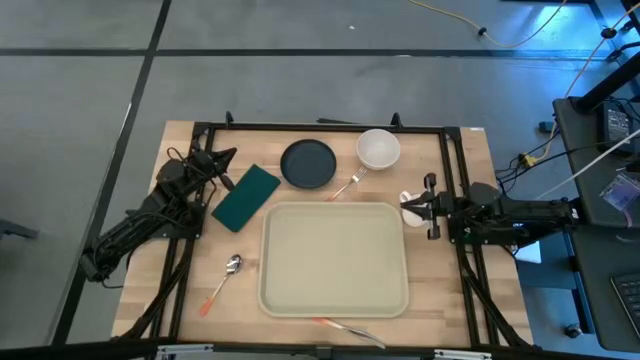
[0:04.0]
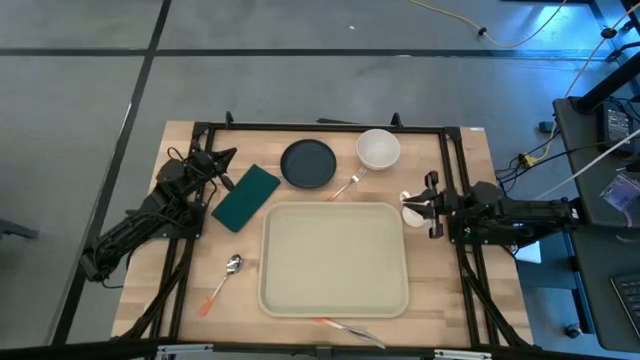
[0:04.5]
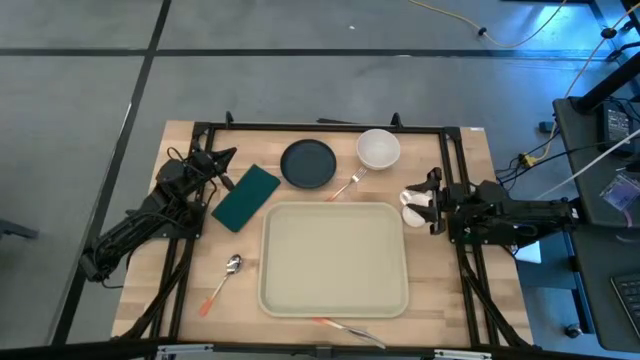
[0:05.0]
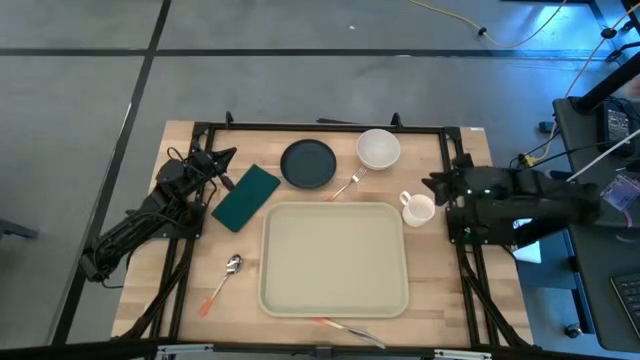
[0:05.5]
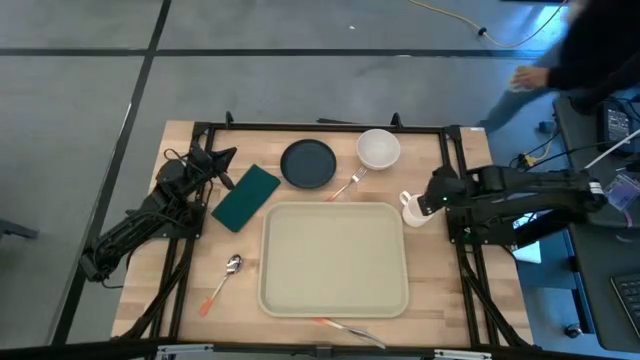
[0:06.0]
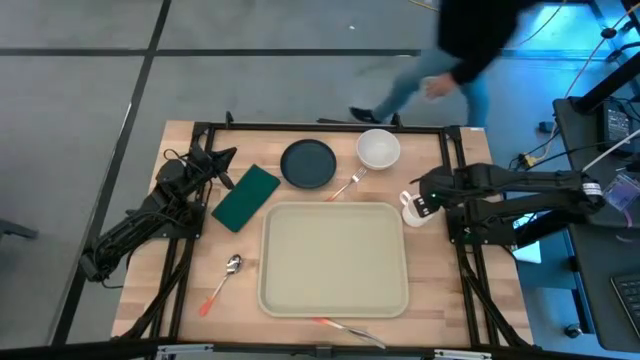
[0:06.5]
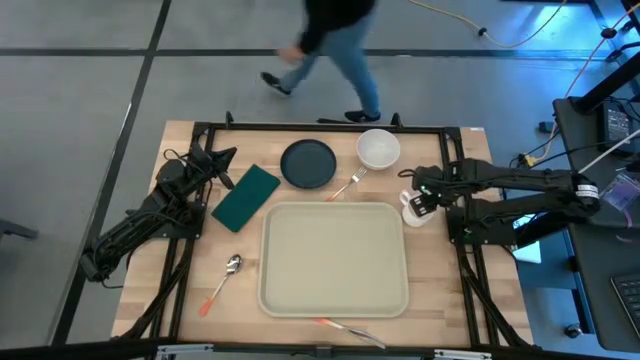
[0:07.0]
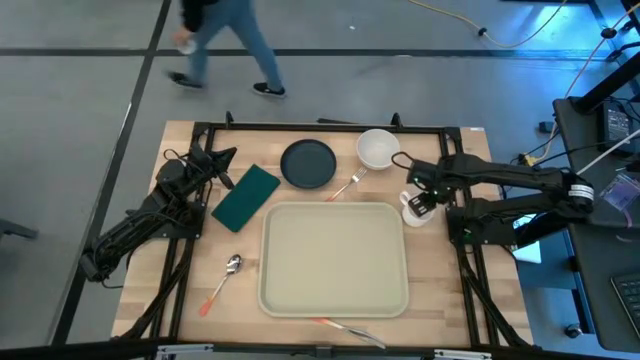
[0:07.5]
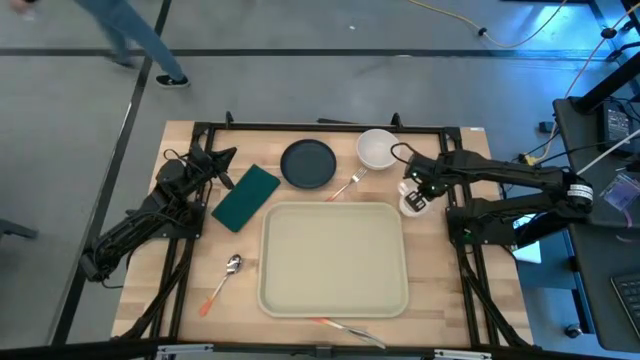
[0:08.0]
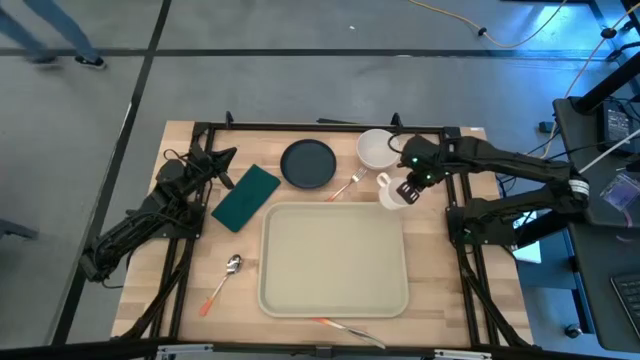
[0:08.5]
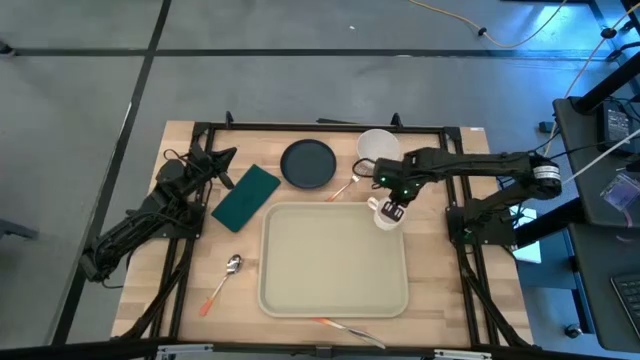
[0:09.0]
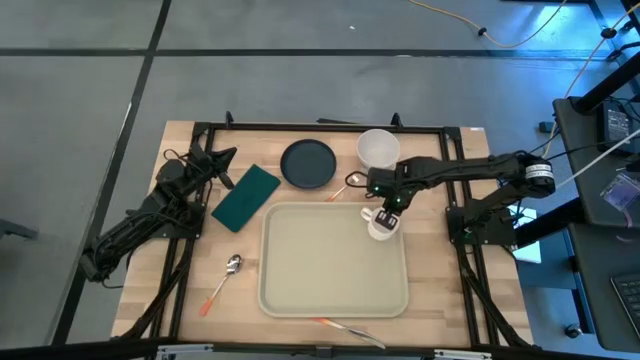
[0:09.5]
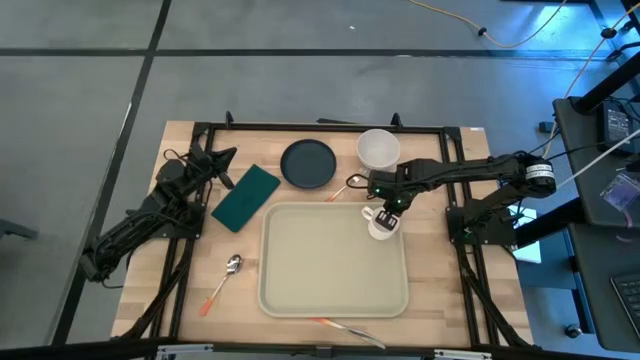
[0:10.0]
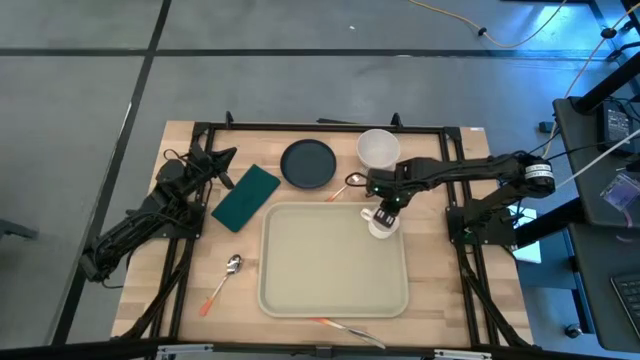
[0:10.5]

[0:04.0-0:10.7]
Task: Set up tray
Put the white mug on the light brown serving tray

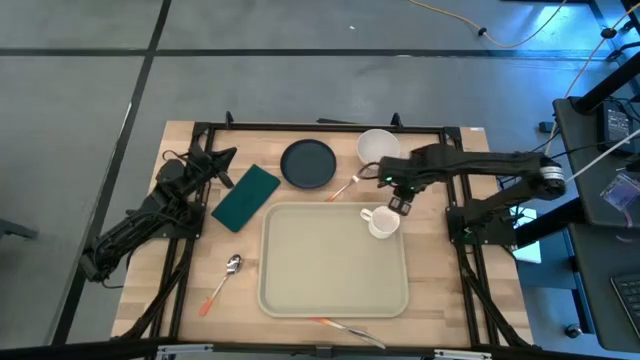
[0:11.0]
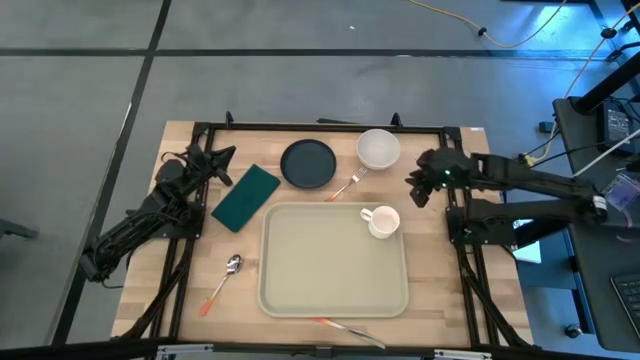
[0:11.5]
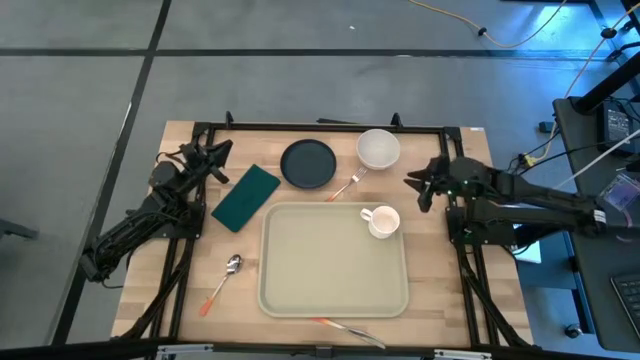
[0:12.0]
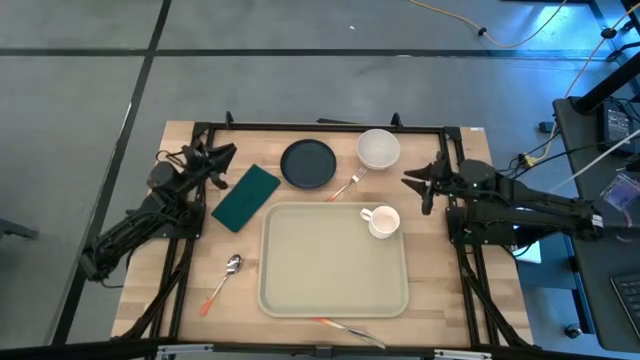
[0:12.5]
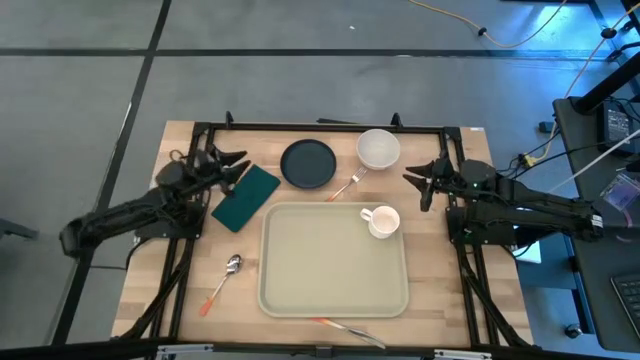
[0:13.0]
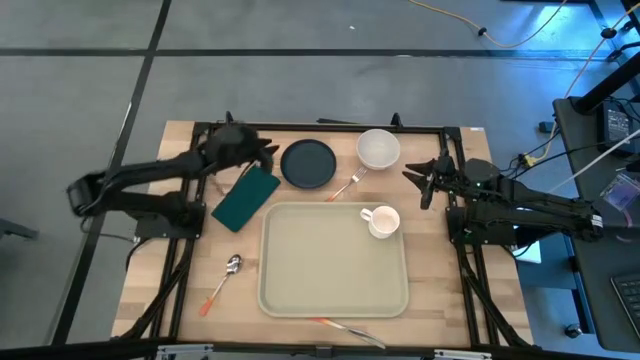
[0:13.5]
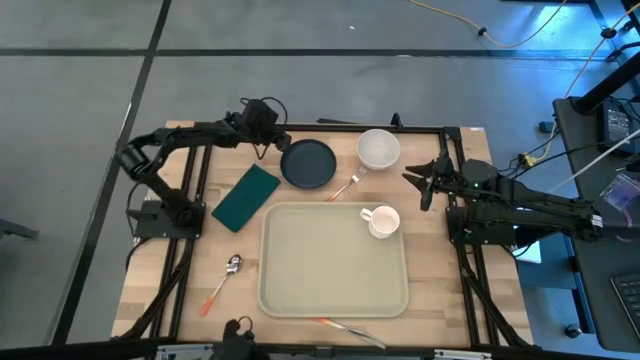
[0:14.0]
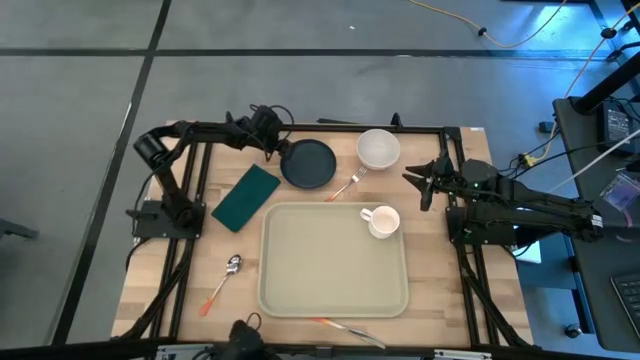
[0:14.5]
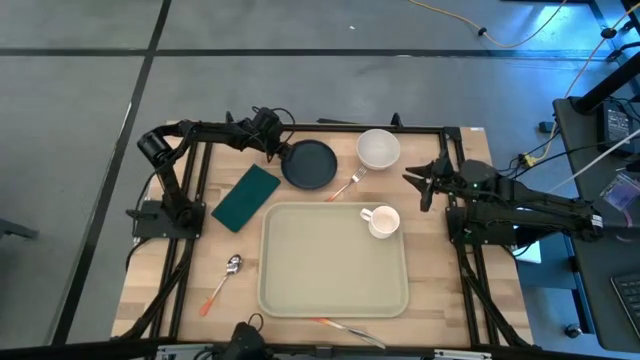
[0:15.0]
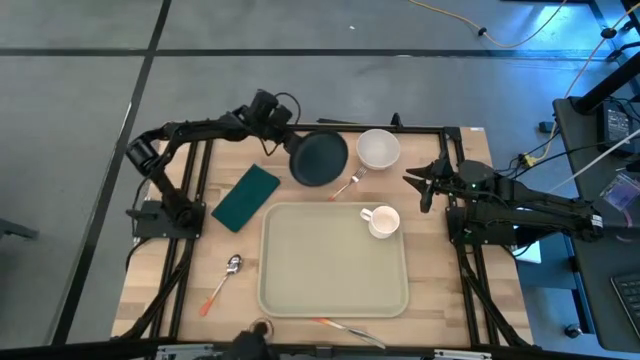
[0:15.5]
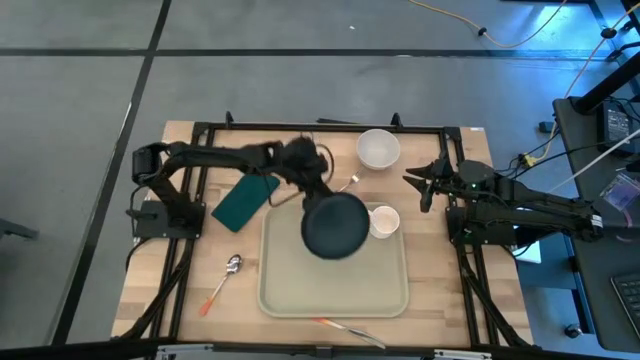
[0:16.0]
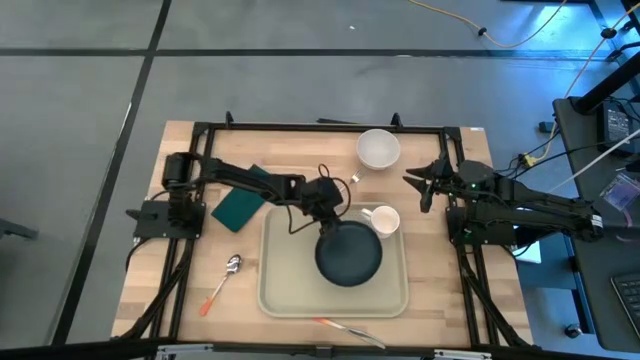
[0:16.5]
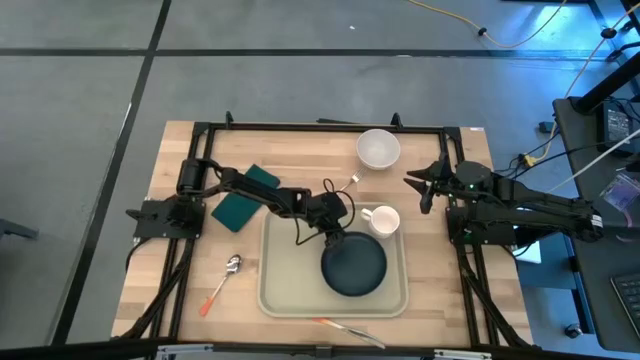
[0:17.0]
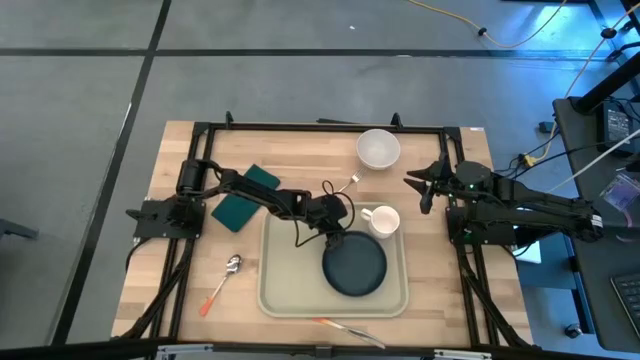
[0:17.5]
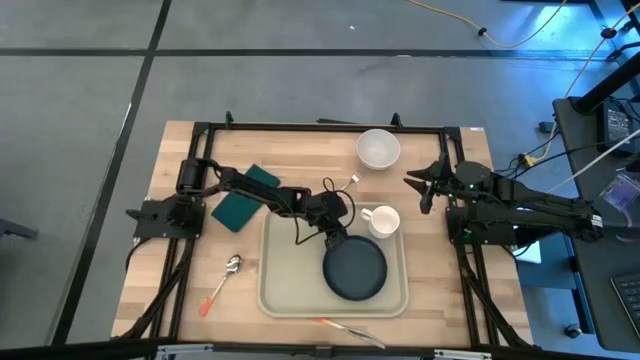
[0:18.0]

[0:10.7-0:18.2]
Put the black plate on the light brown serving tray

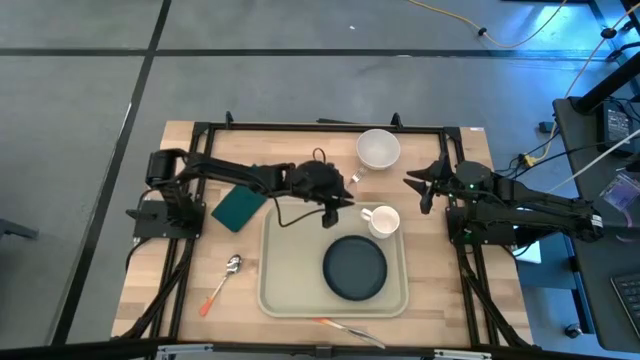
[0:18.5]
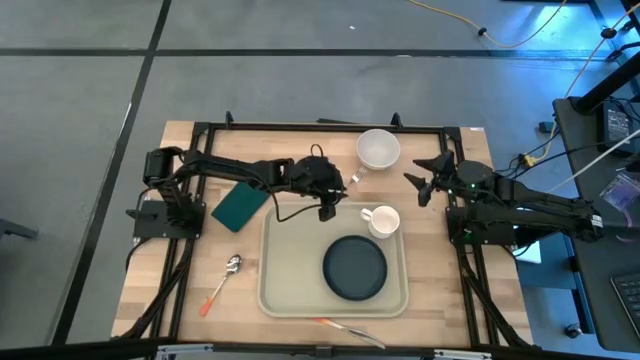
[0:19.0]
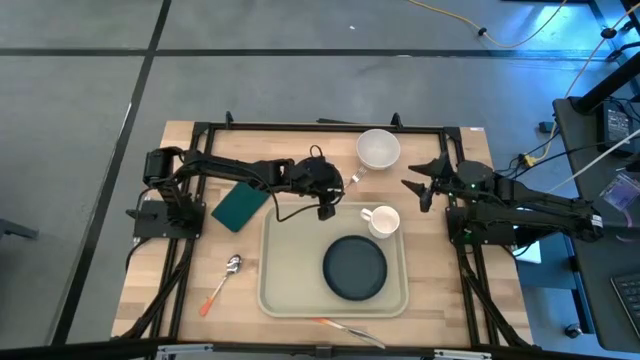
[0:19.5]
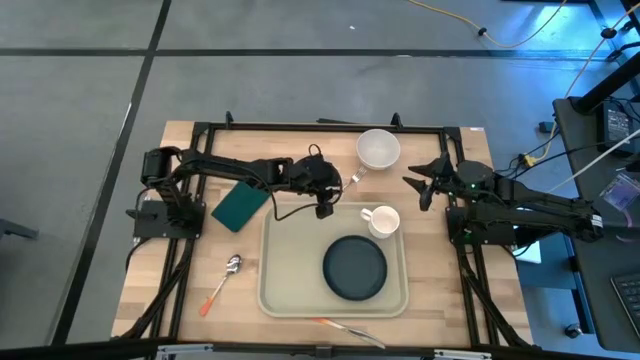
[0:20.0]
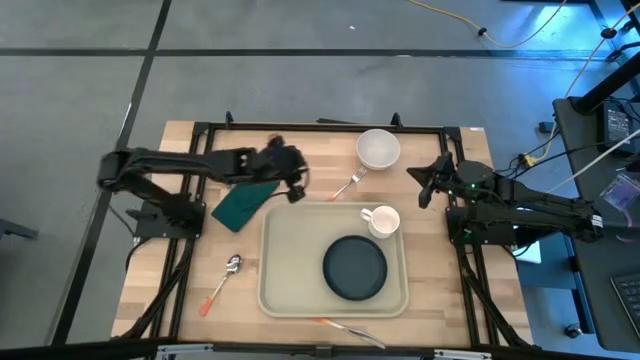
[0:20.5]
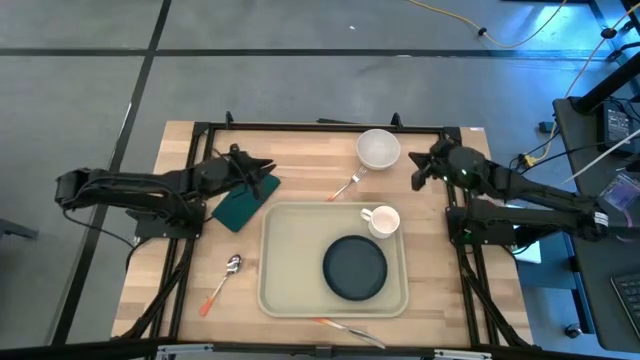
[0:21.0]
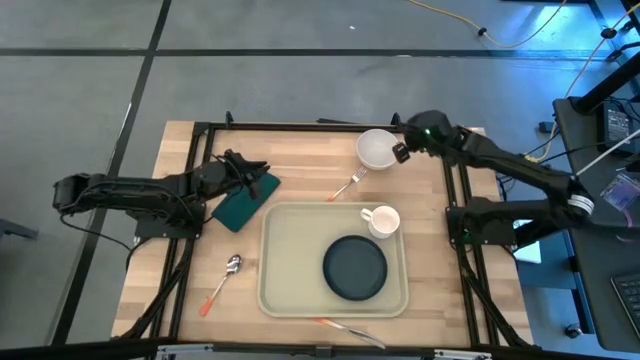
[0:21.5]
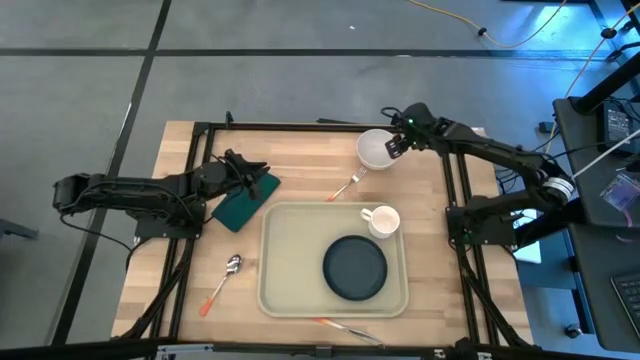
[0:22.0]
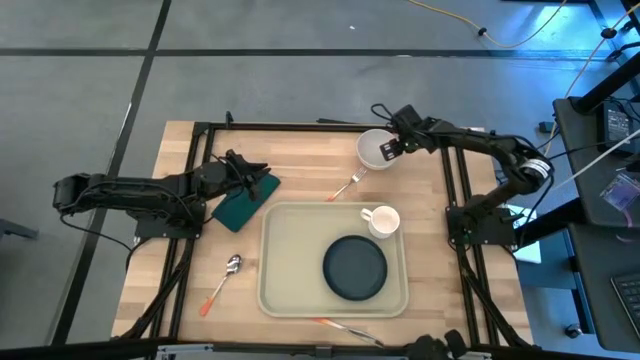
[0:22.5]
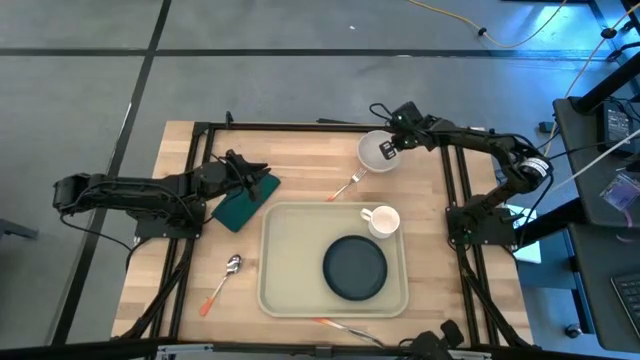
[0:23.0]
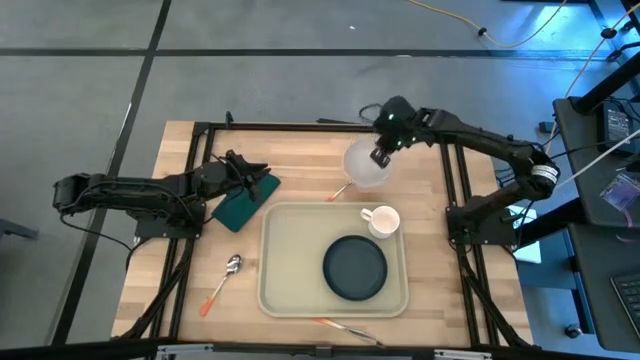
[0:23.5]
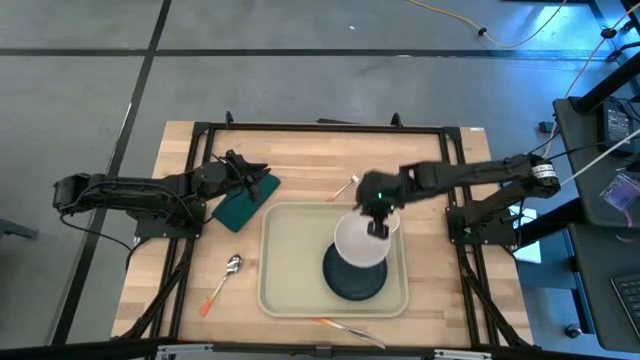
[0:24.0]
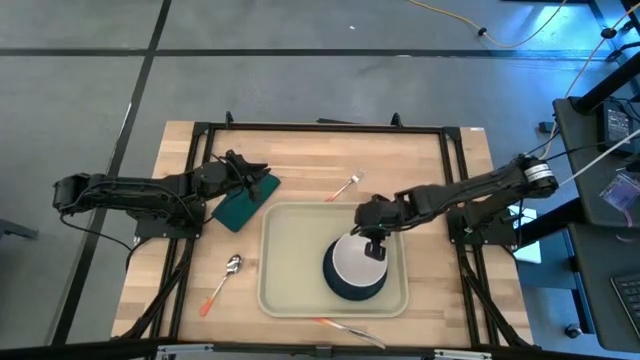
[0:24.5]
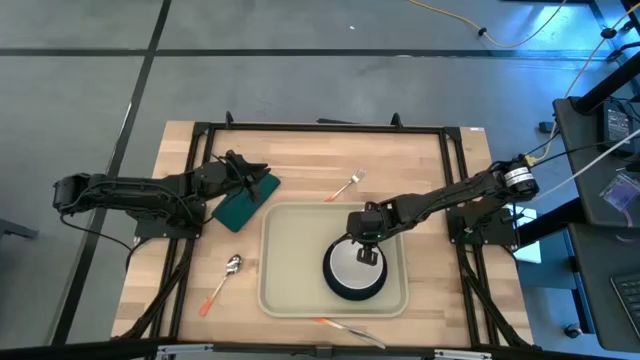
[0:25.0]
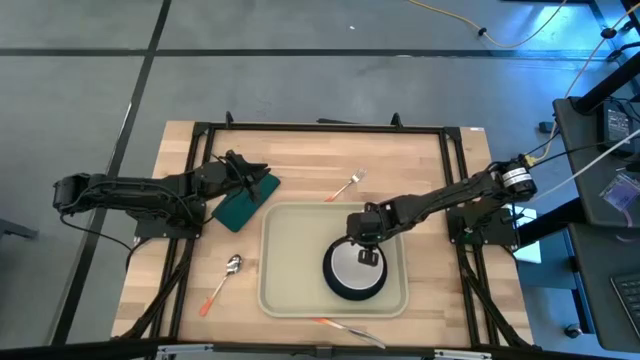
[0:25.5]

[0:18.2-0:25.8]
Put the white bowl on the black plate
